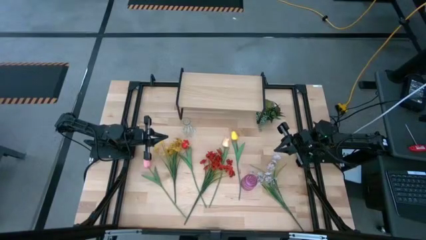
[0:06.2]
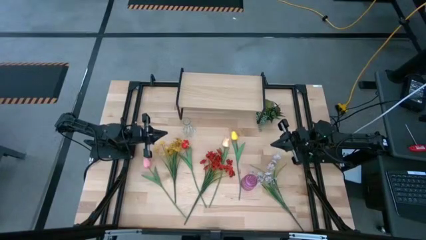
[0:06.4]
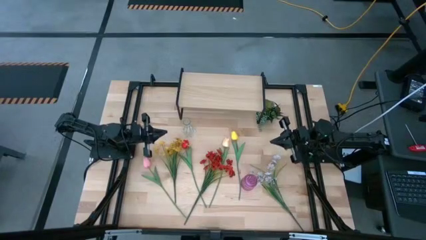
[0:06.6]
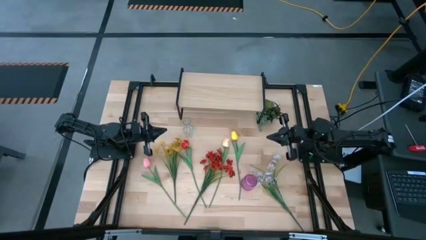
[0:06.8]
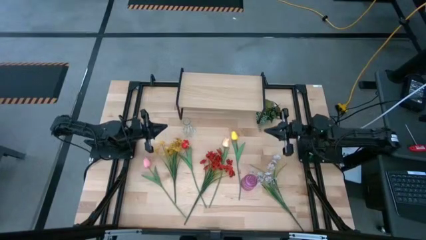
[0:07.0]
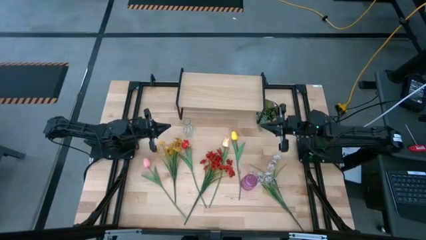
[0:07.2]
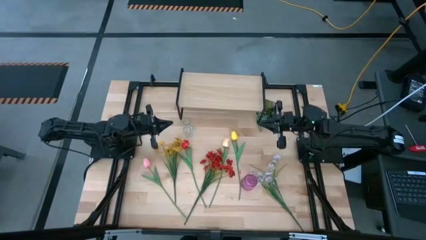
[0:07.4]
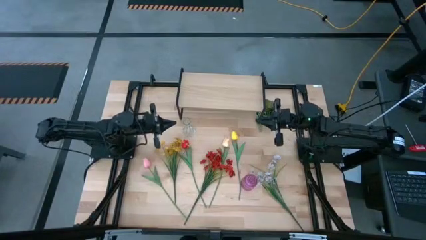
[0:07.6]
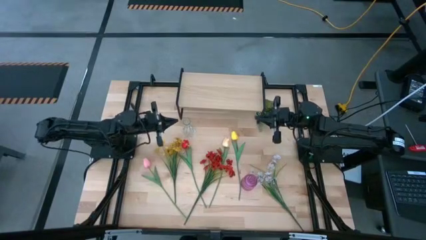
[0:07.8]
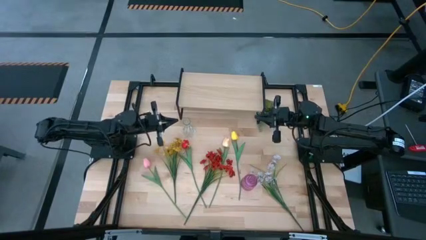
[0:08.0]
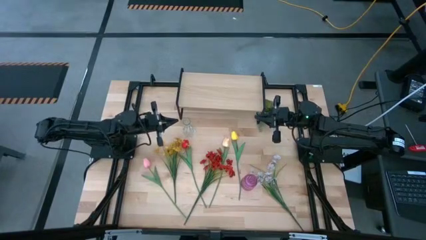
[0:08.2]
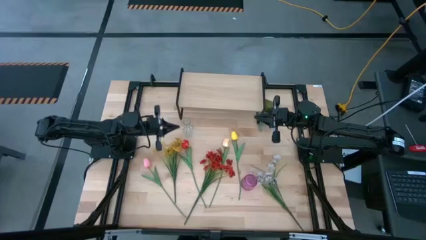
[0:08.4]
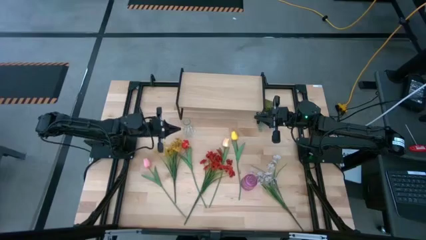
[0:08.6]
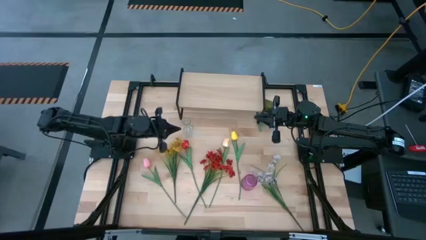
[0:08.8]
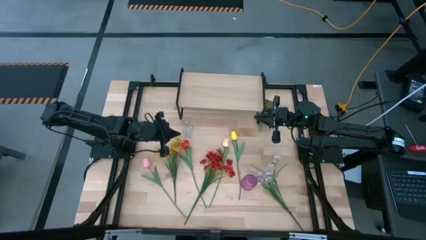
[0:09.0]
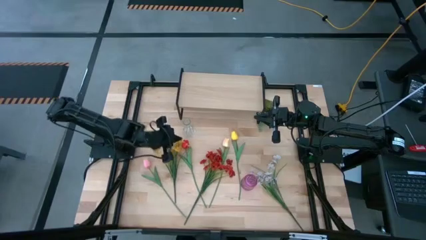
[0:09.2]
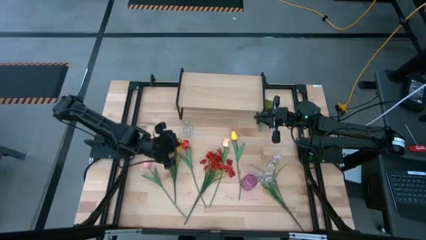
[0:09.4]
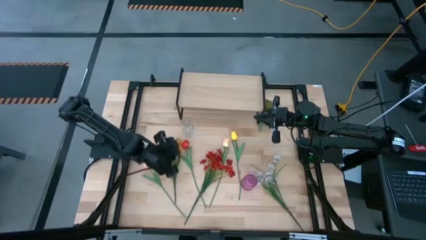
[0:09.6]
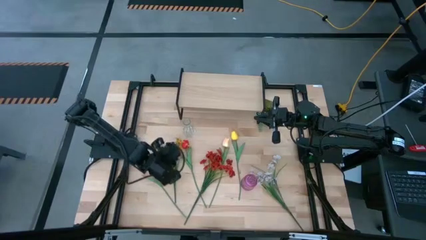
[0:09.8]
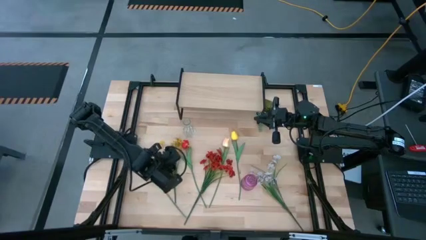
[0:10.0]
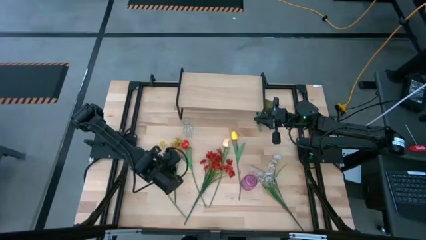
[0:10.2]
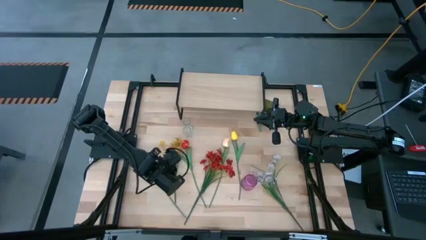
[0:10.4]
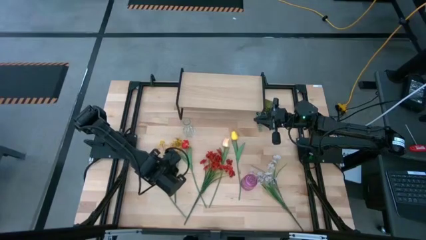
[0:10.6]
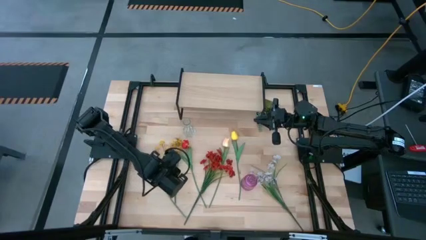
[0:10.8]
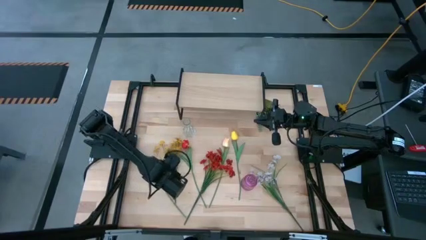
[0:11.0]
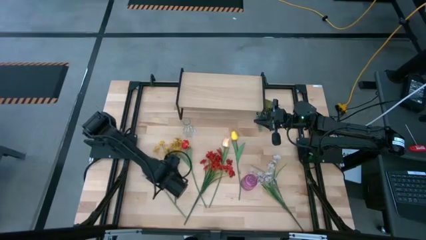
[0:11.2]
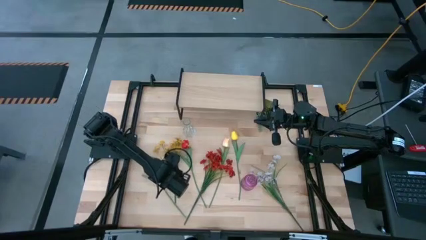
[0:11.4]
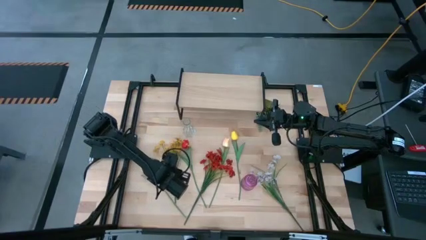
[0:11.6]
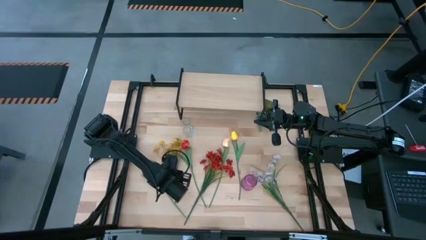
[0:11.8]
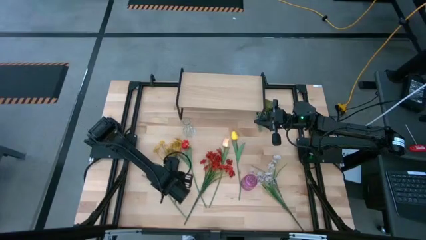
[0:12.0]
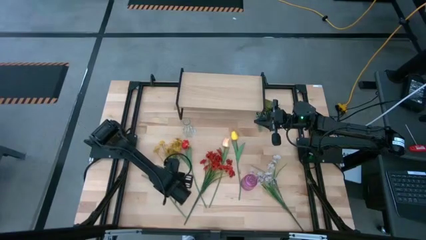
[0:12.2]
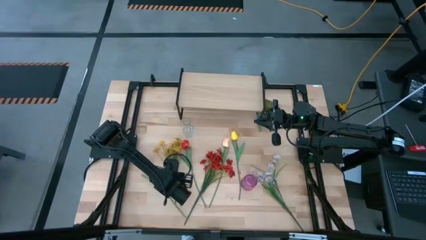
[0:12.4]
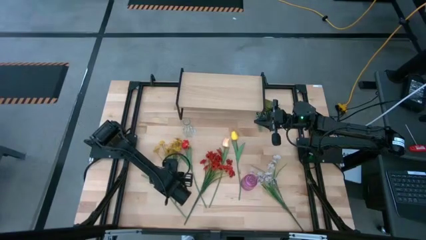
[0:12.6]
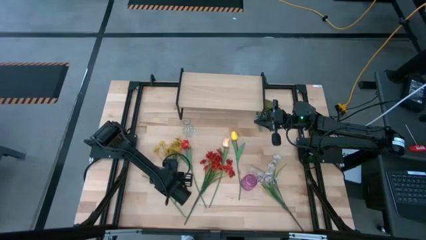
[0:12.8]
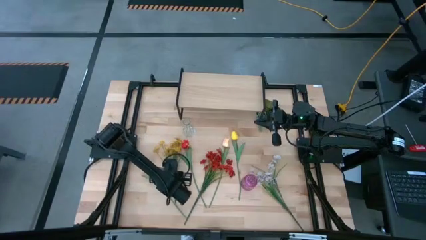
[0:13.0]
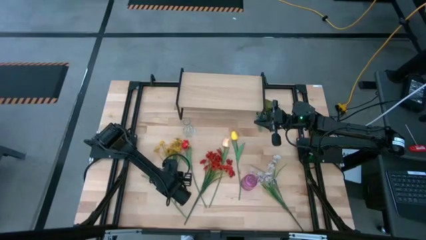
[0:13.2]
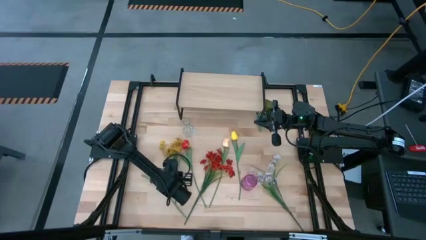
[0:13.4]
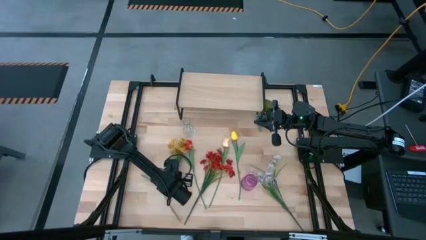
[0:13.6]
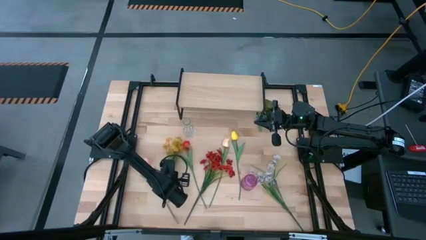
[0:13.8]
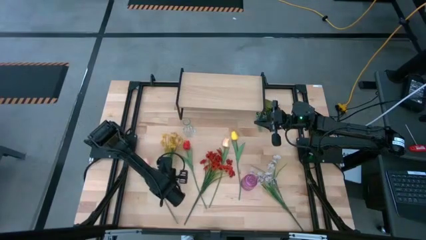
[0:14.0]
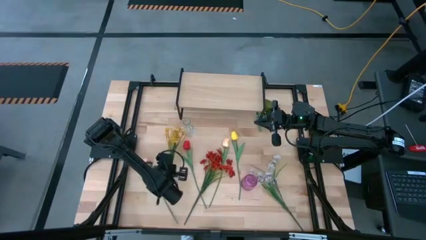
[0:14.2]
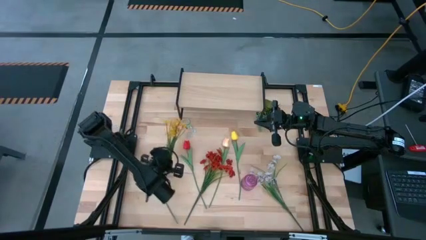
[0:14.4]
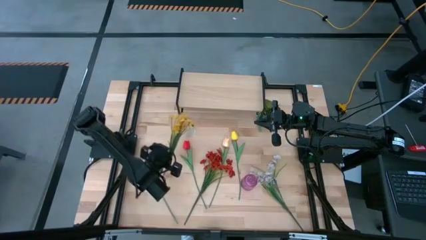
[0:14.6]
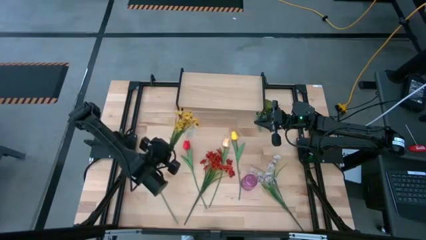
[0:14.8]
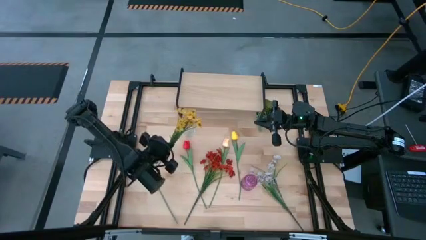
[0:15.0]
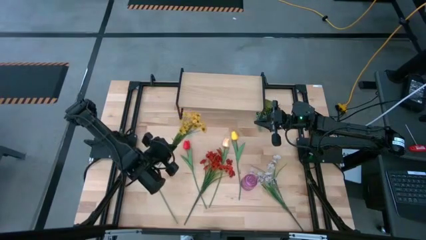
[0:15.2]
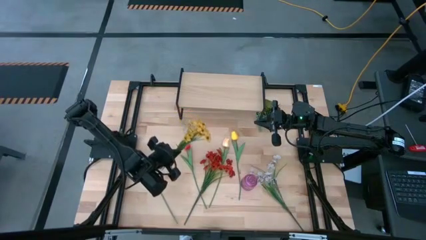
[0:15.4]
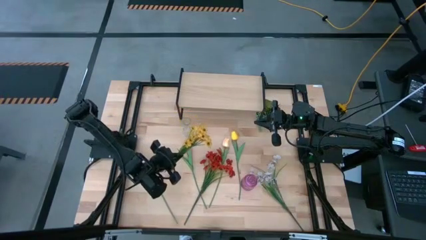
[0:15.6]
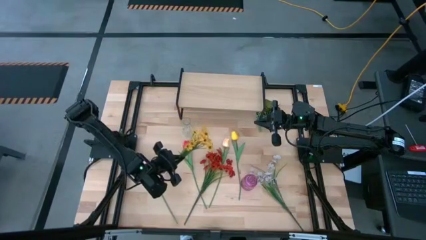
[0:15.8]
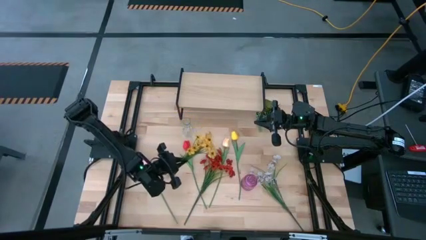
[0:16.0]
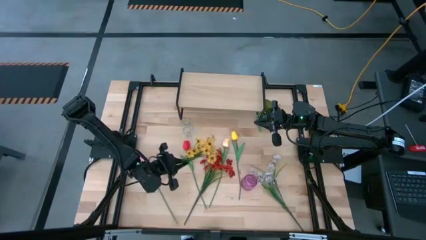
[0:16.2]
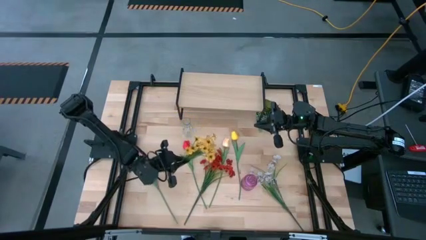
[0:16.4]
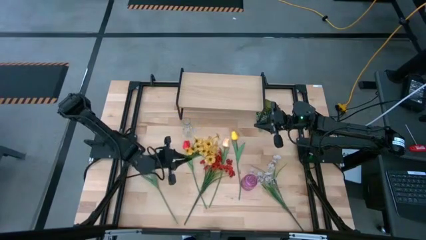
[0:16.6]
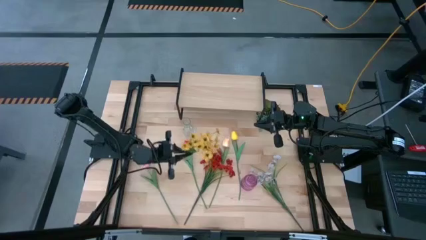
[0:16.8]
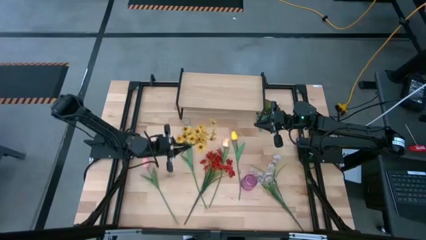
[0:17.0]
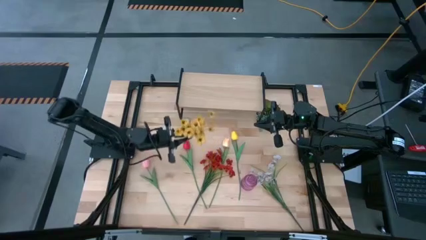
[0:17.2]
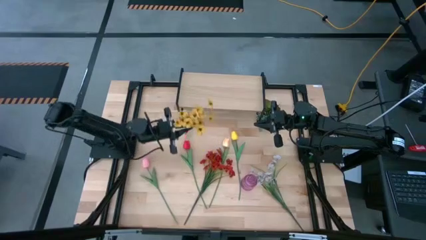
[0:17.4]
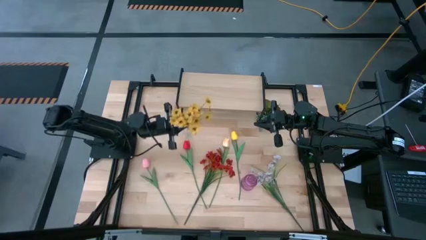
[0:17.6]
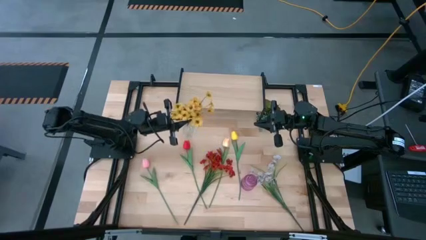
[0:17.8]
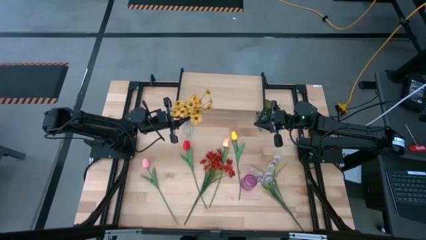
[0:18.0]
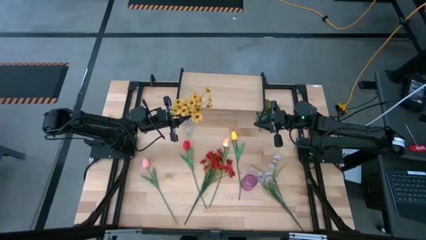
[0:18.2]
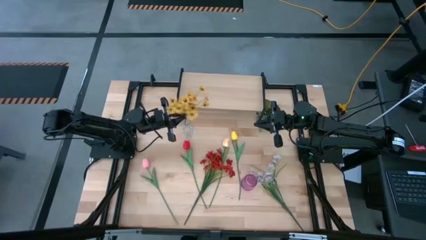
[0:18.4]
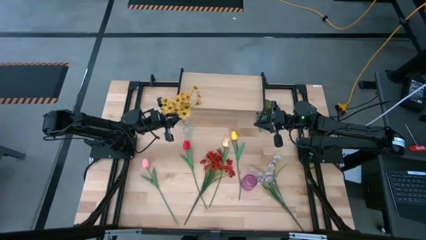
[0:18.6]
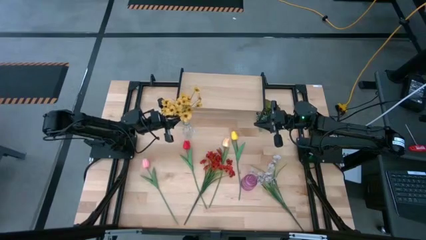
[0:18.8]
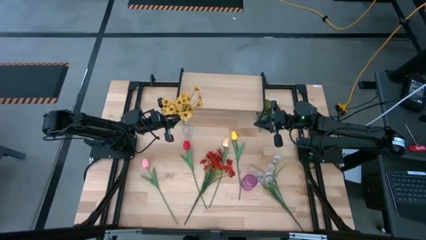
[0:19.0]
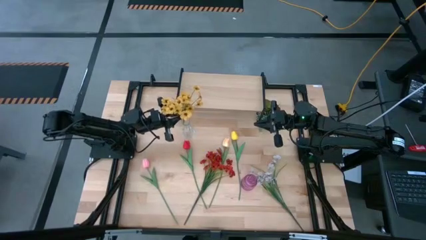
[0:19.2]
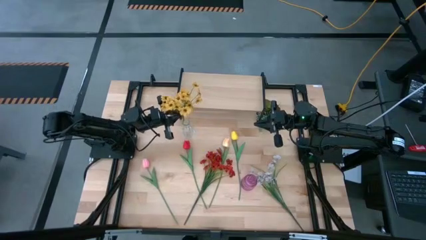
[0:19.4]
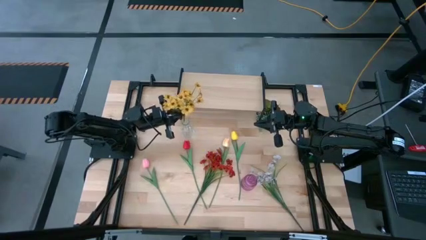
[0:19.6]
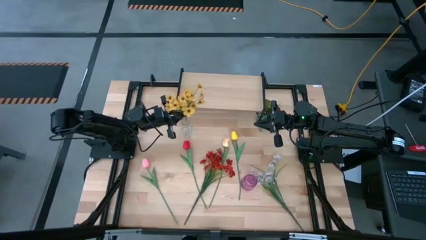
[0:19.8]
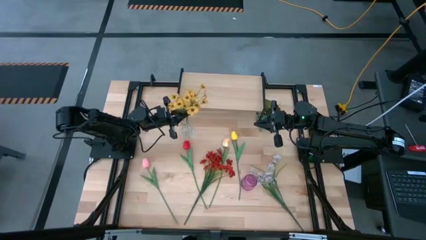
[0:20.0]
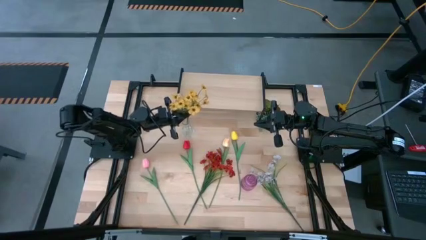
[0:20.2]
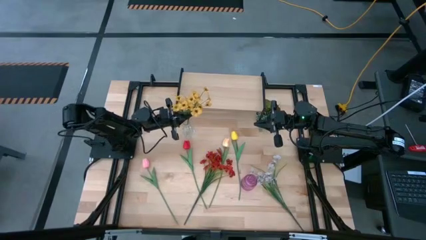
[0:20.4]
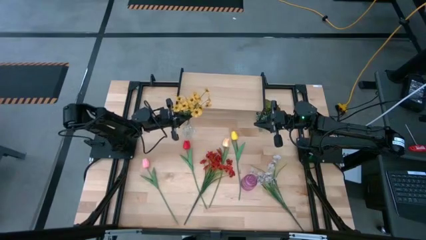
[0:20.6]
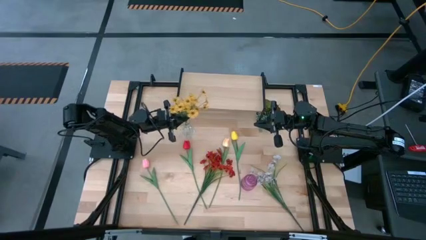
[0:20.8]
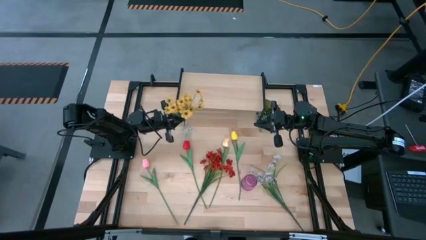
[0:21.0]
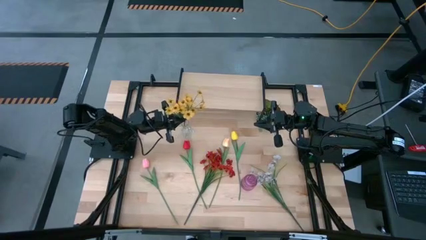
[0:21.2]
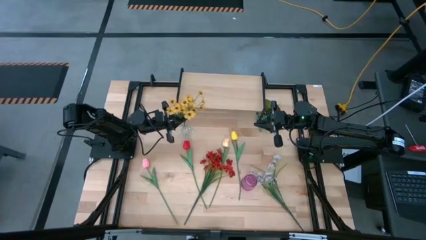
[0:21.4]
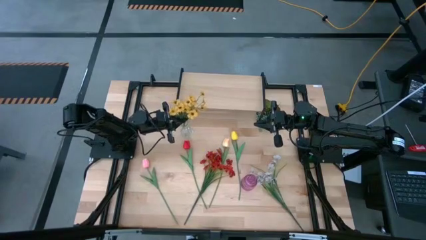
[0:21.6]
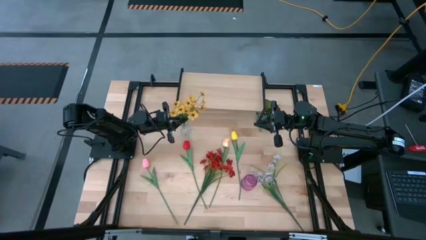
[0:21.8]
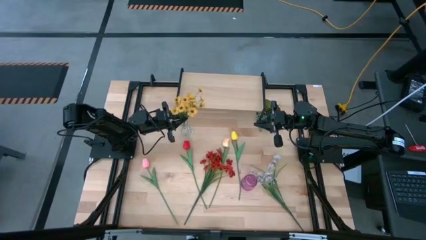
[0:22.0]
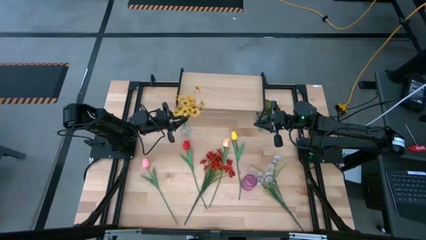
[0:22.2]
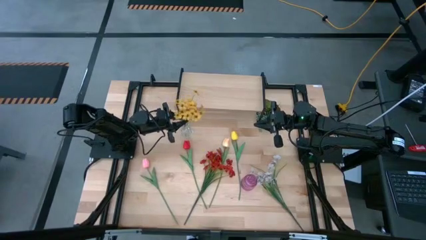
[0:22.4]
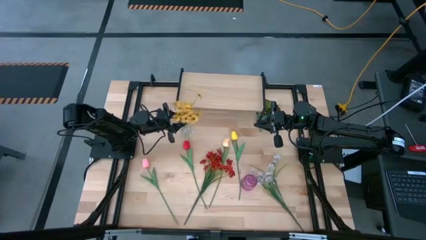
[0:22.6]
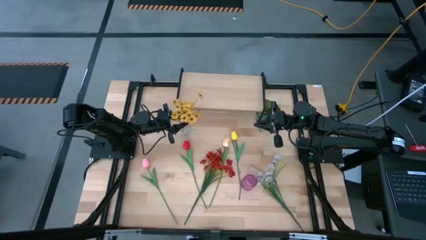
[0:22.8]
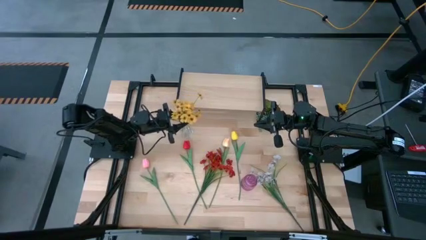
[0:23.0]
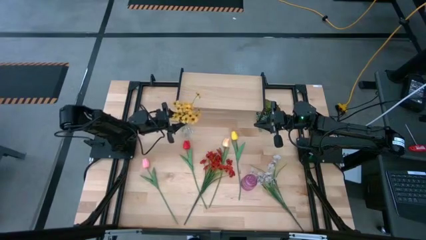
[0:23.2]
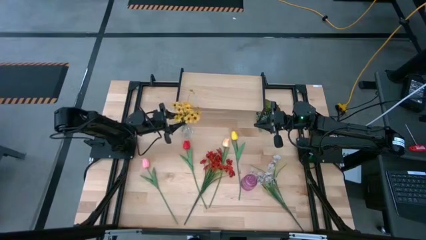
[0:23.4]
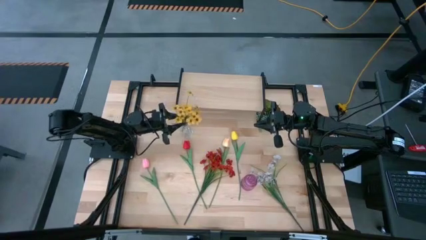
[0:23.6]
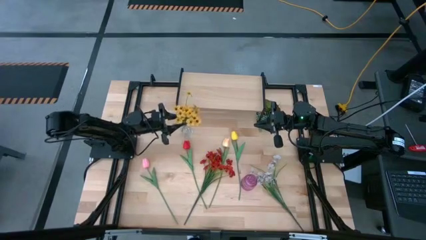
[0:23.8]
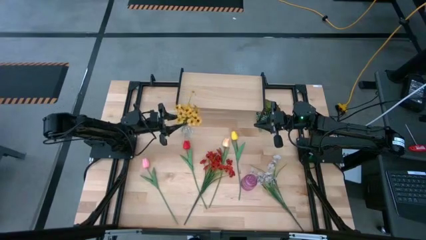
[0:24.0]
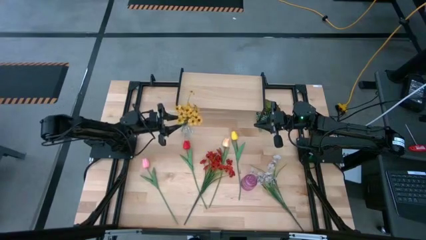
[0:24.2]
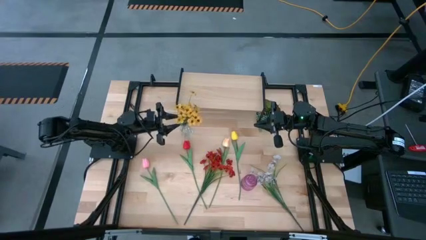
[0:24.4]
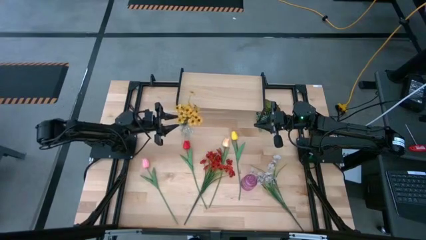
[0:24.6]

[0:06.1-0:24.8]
Task: Pick and place flowers into a vace then onto a shelf
Put the yellow flowers into the transparent vase
